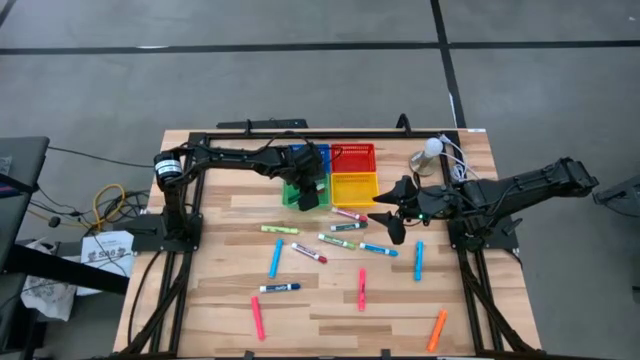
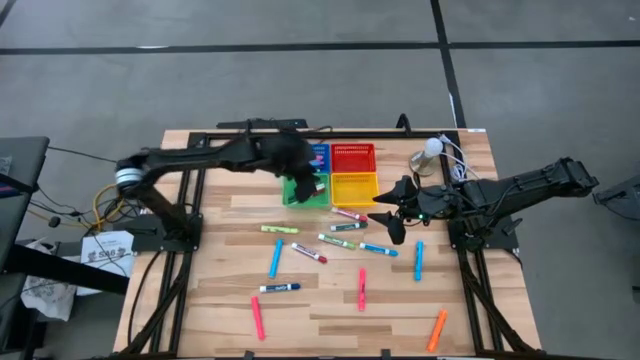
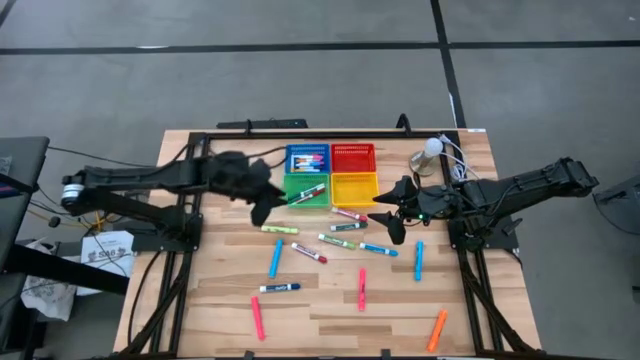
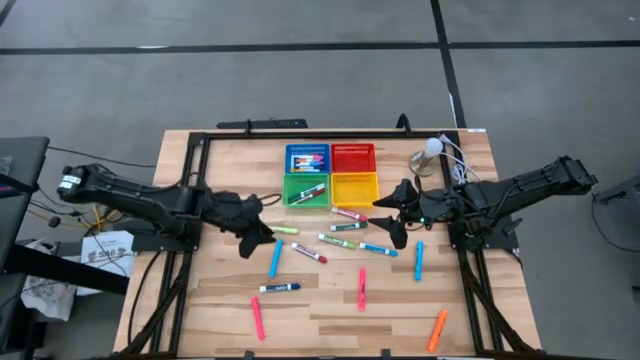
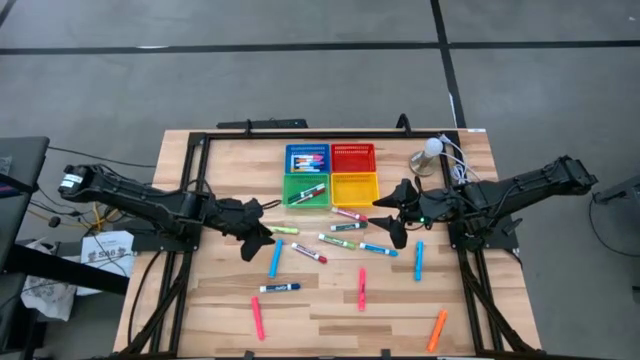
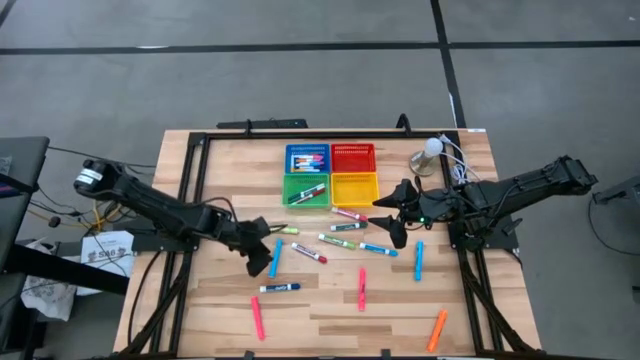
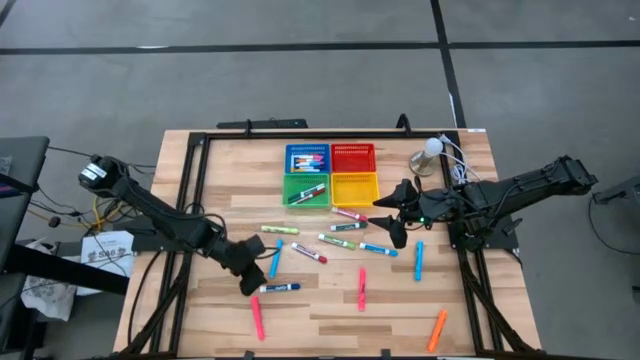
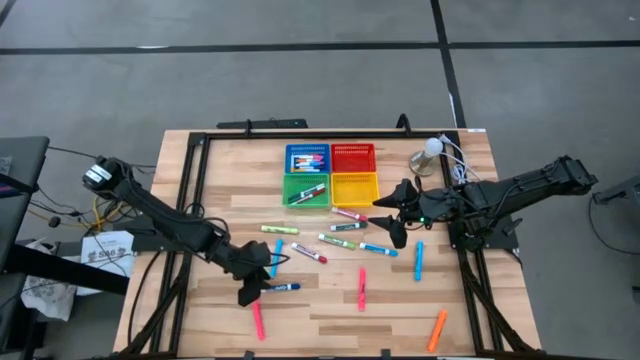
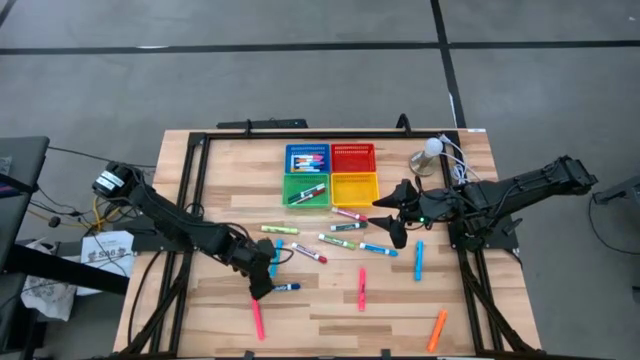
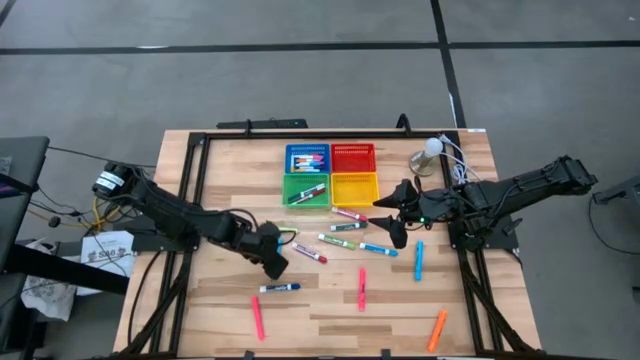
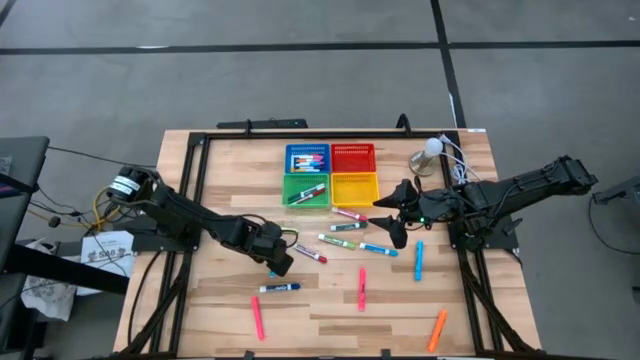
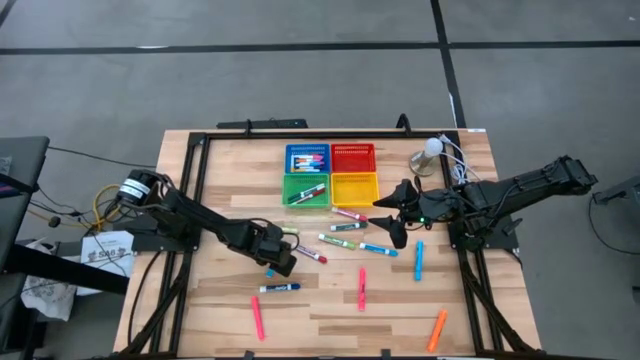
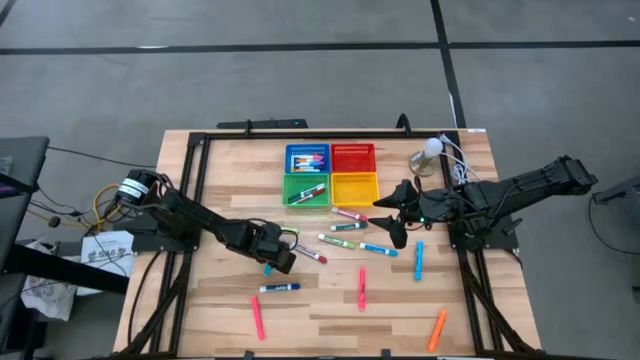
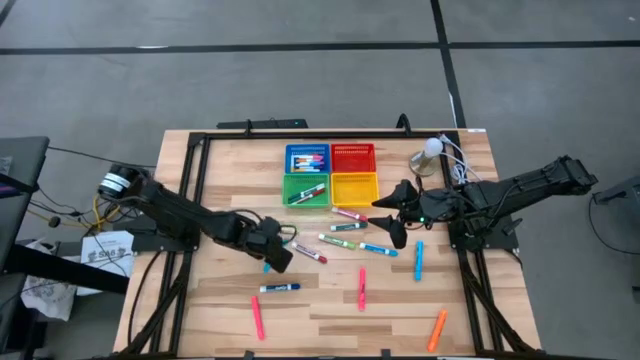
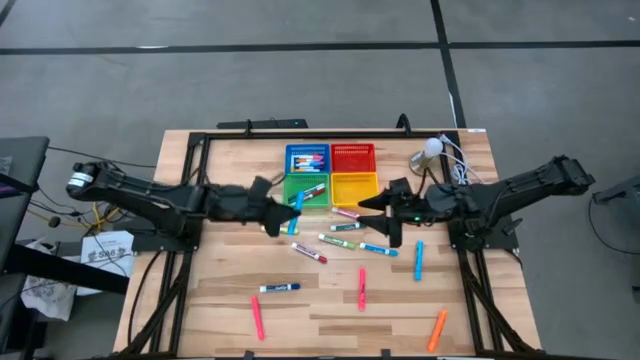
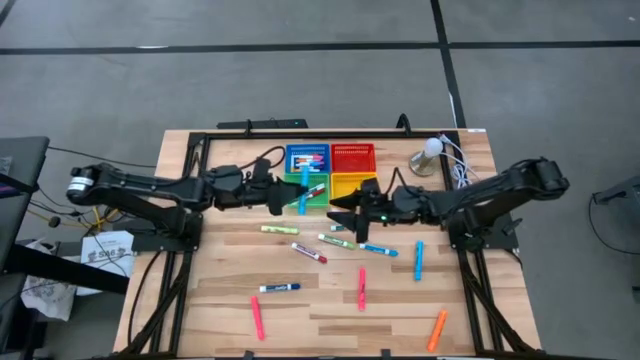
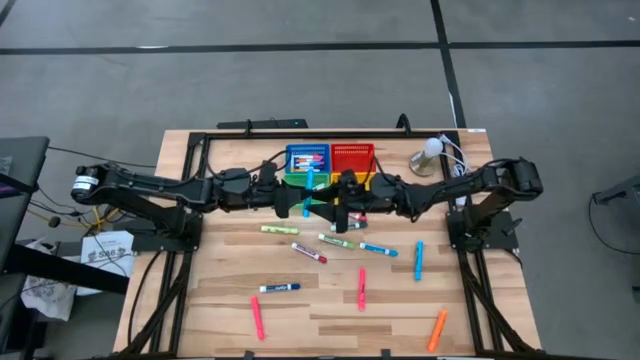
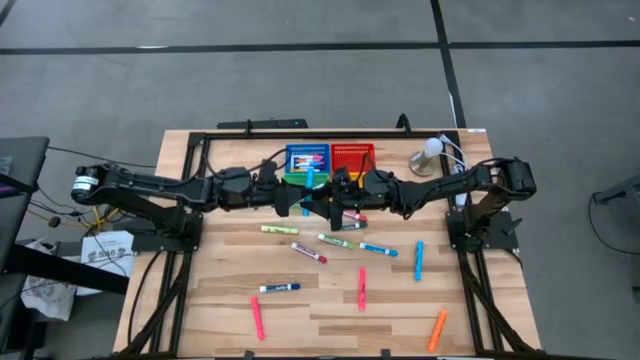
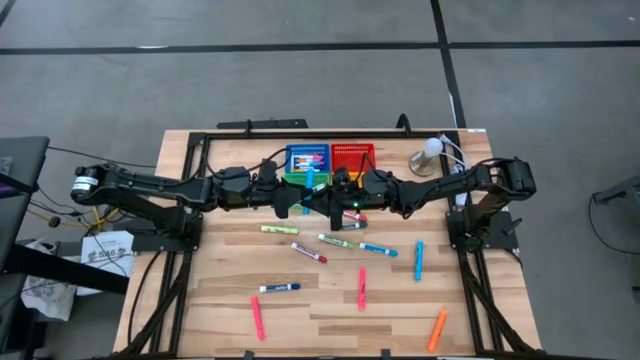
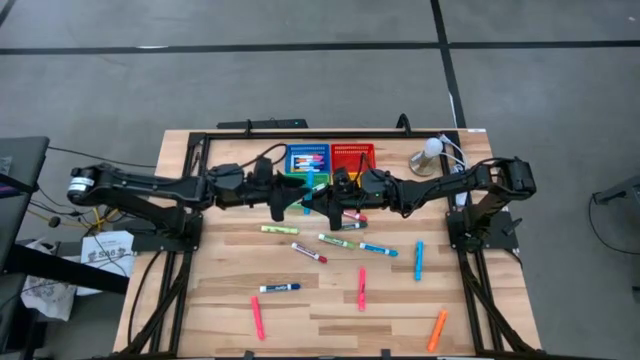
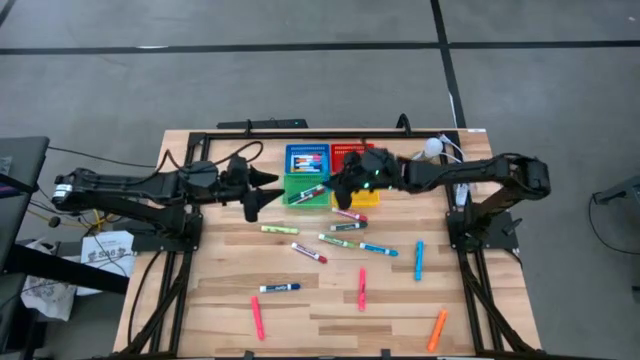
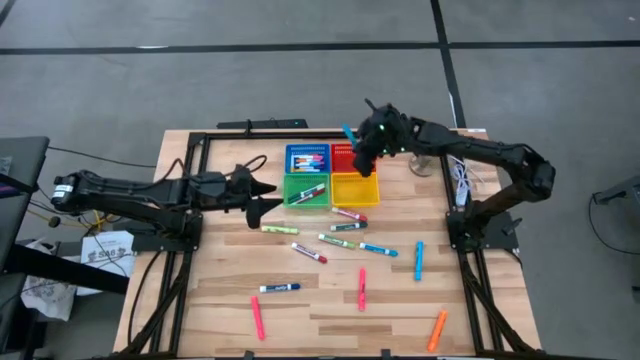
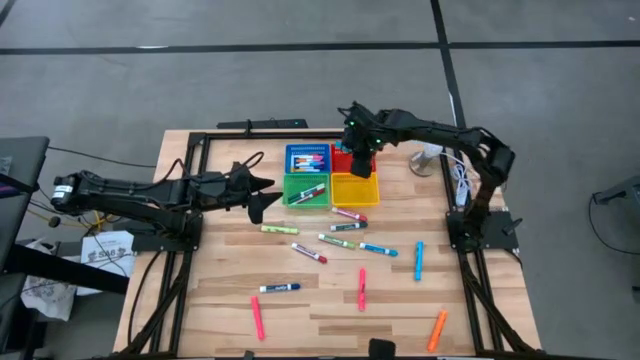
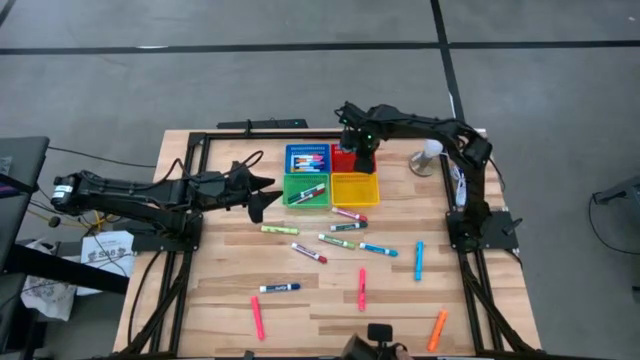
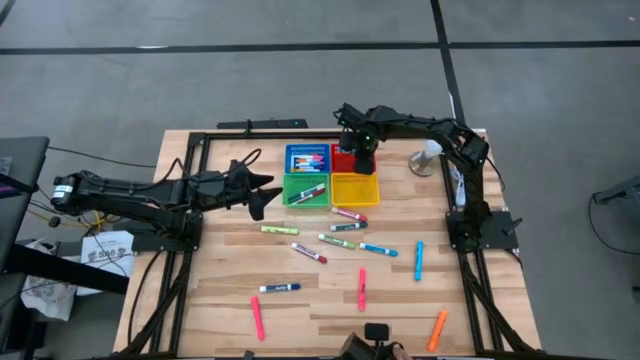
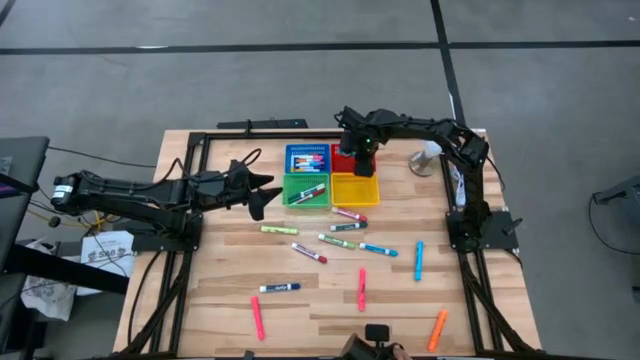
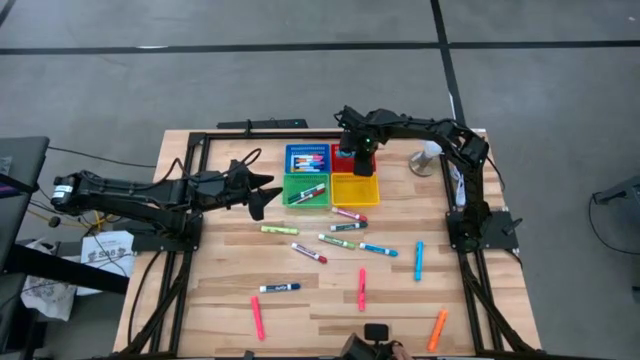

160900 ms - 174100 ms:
Task: Pick & Place Markers
Put the left large light blue highlighter into the red bin

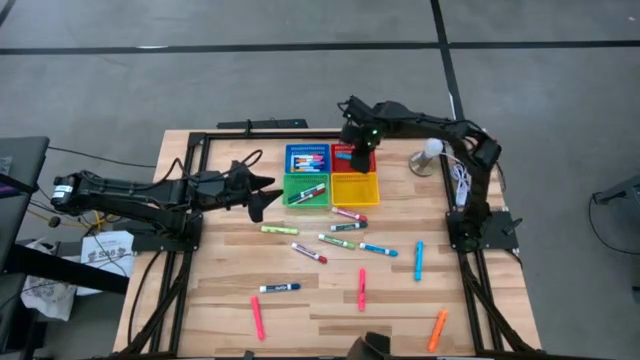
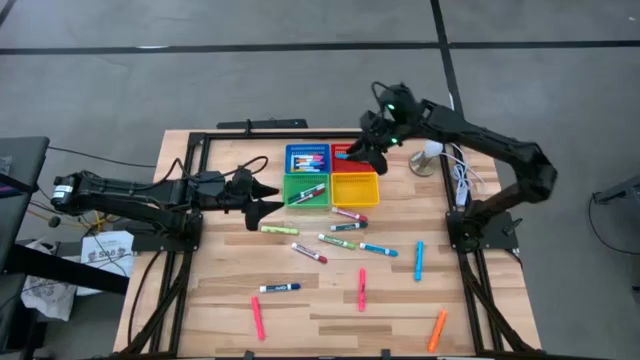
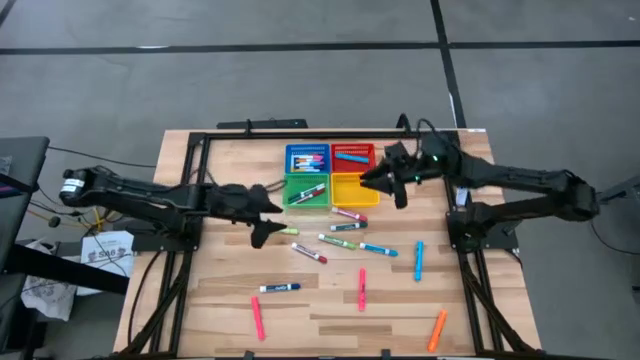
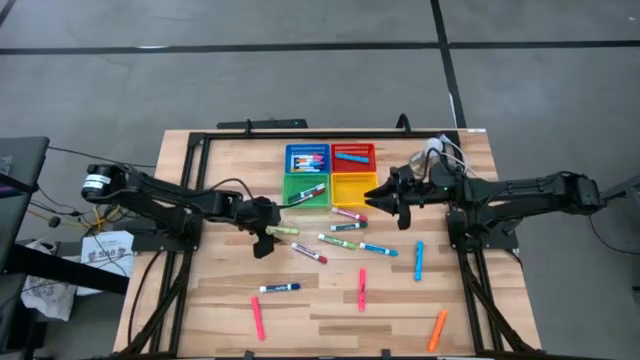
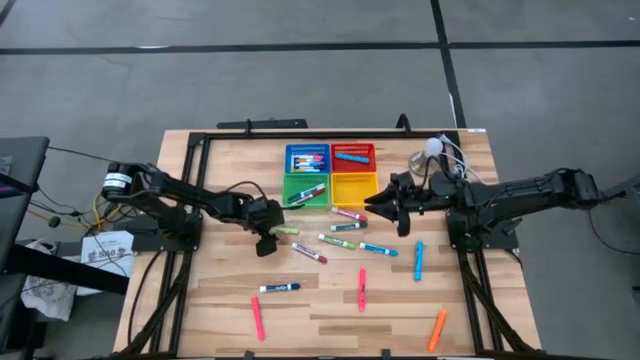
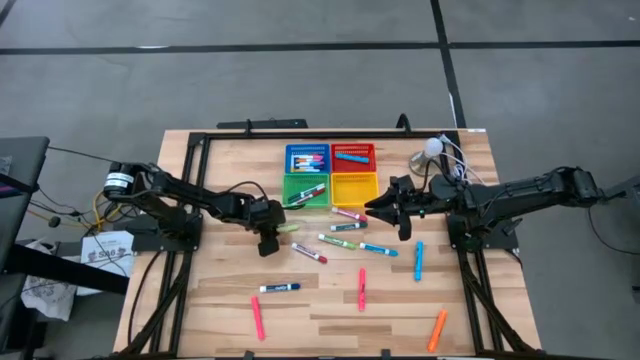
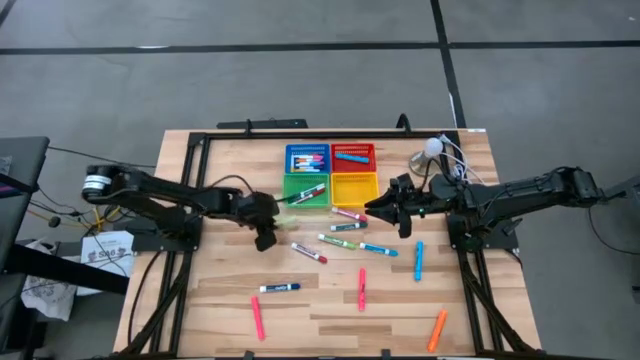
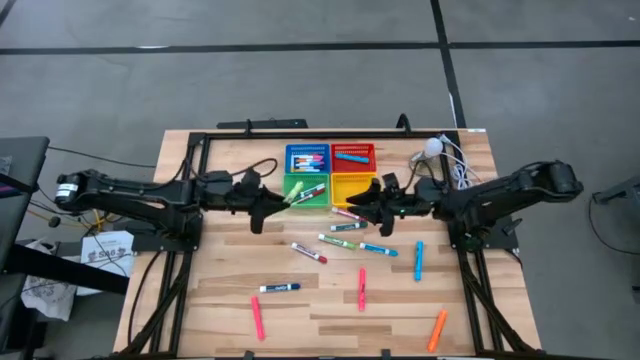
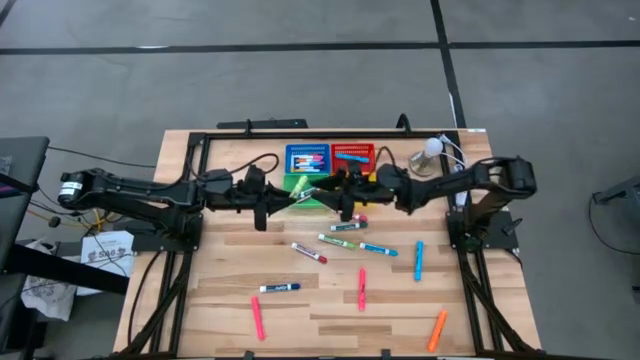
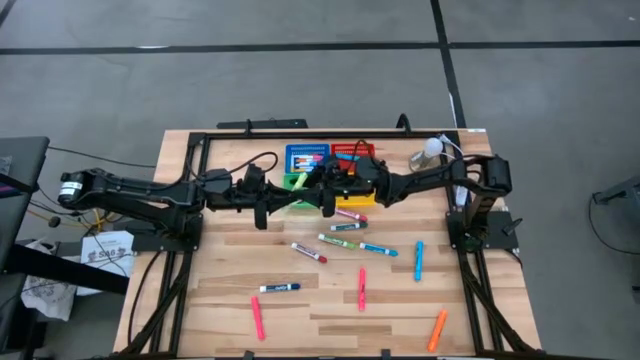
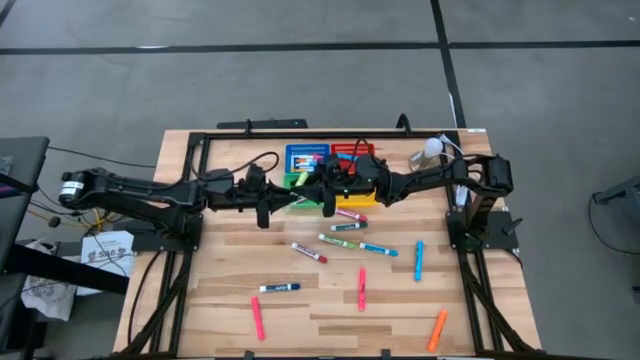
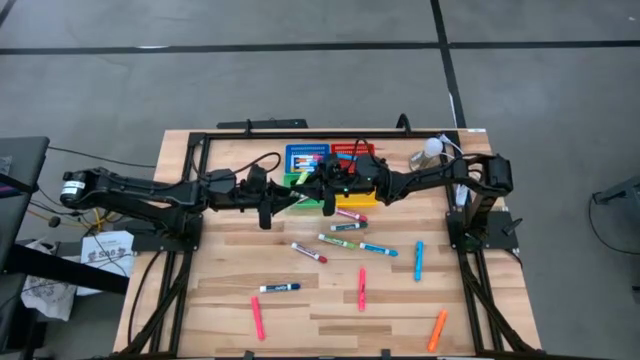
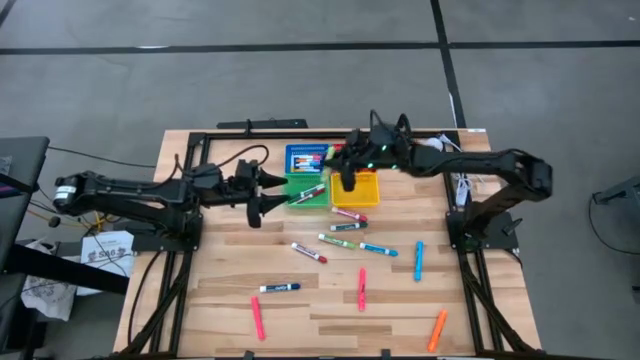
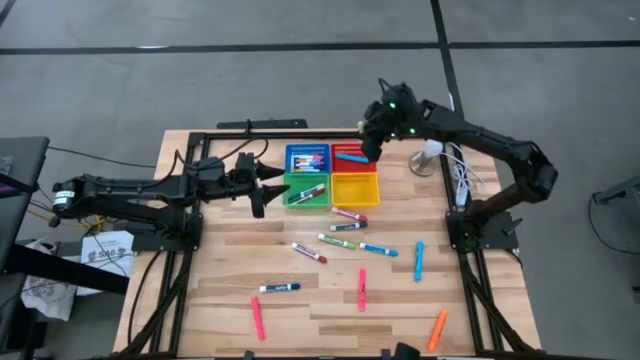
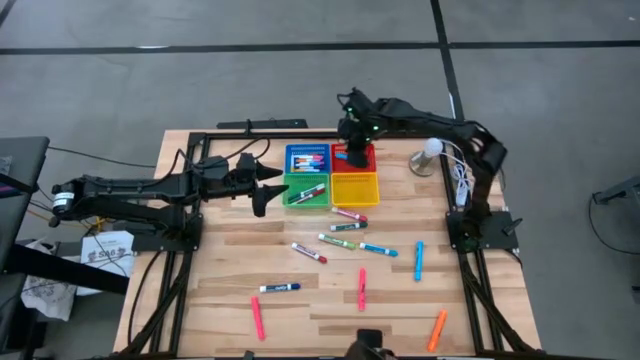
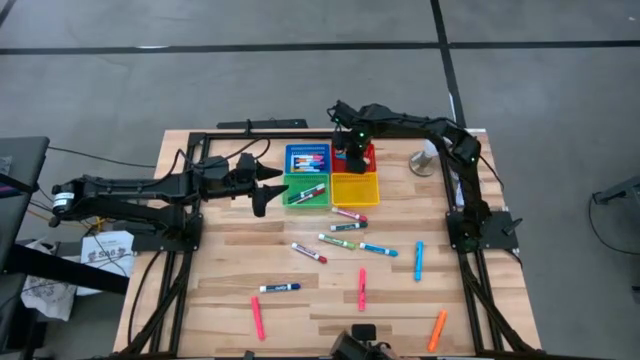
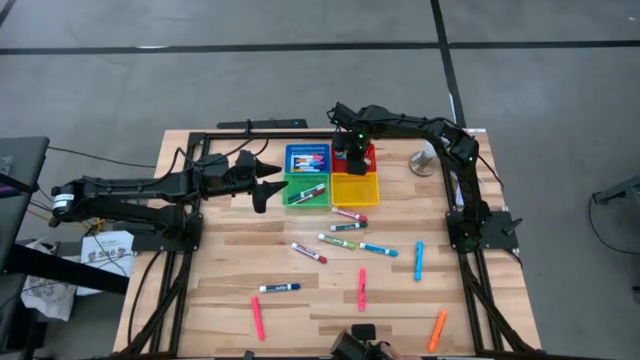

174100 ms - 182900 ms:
Put the large light green highlighter into the red bin
